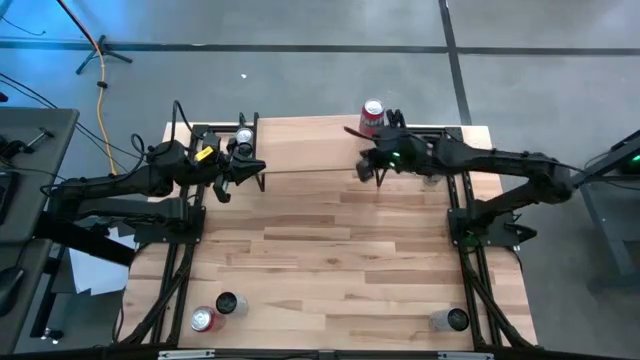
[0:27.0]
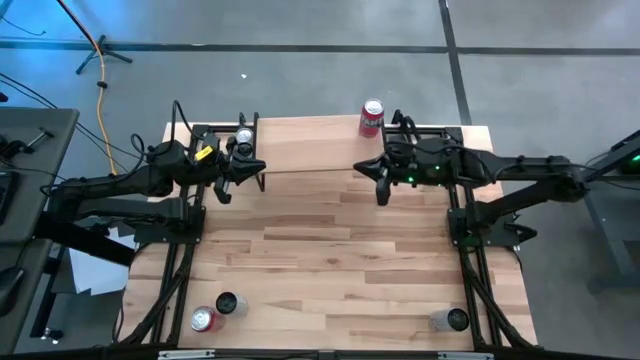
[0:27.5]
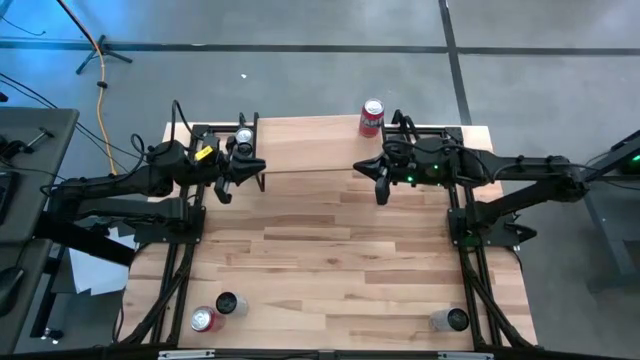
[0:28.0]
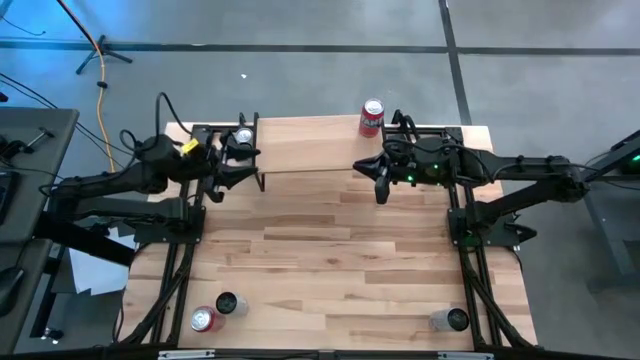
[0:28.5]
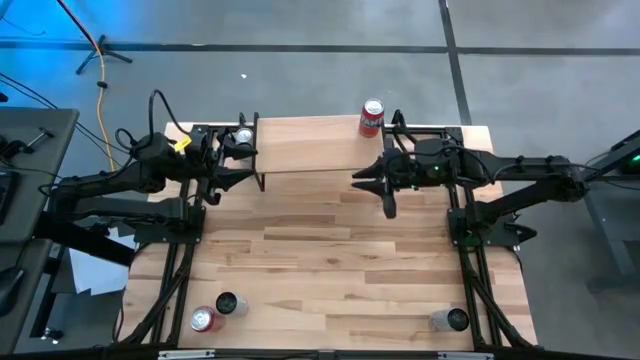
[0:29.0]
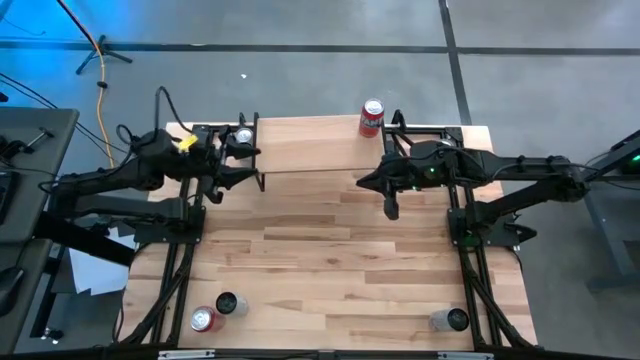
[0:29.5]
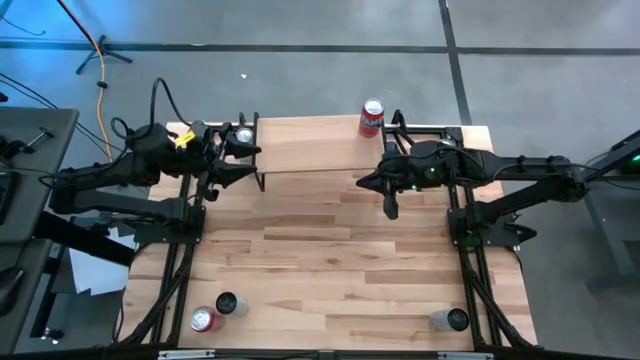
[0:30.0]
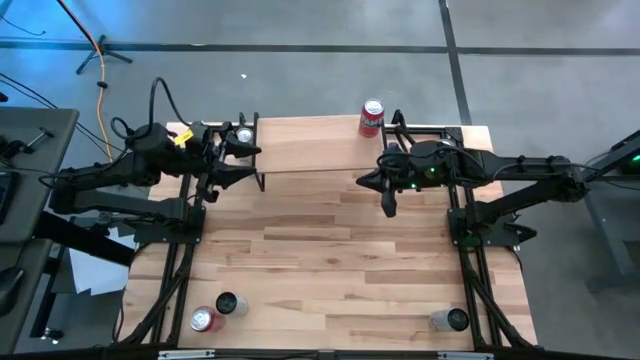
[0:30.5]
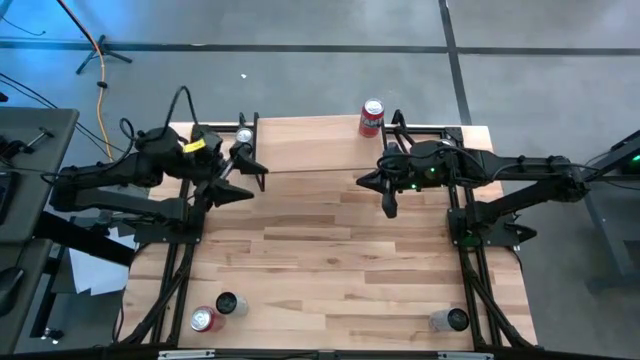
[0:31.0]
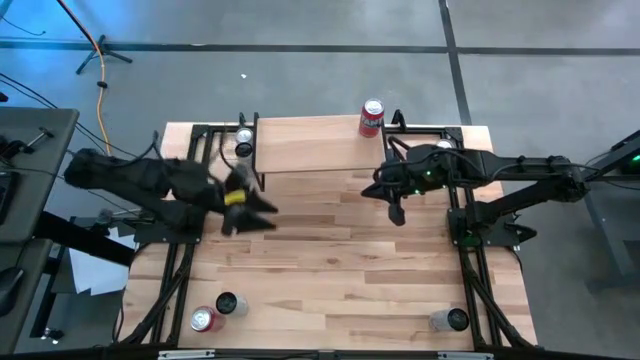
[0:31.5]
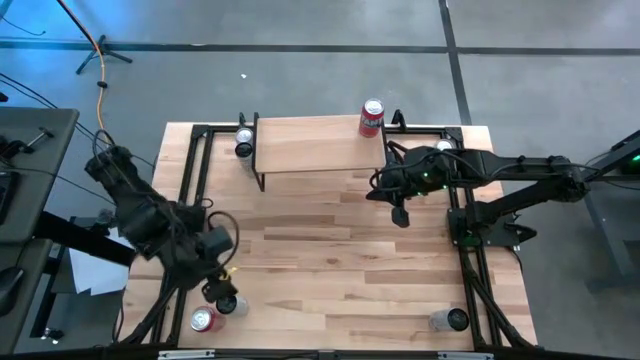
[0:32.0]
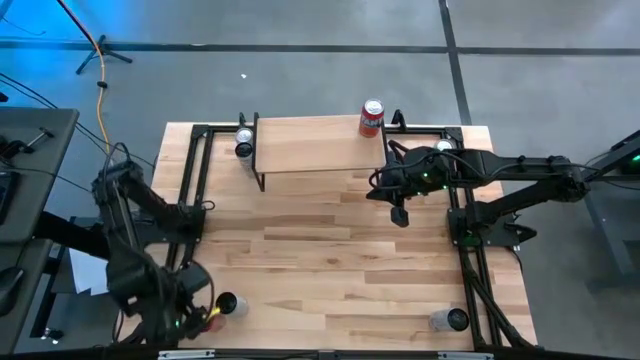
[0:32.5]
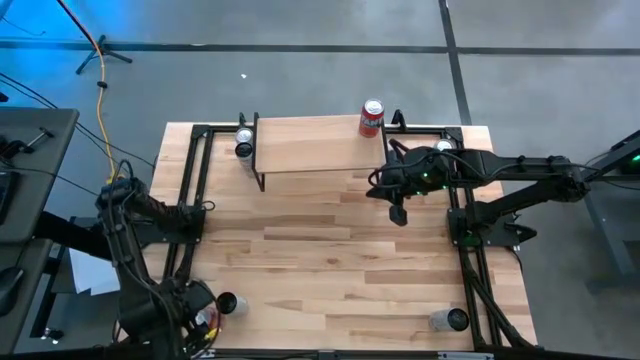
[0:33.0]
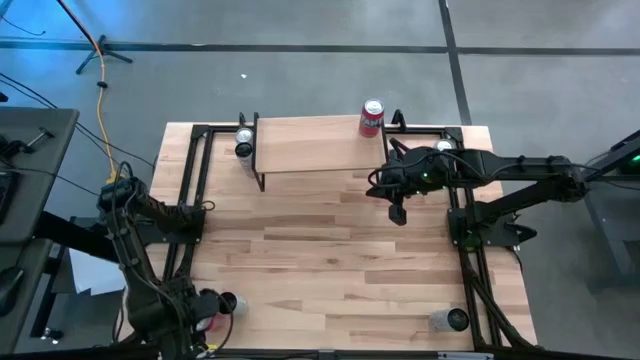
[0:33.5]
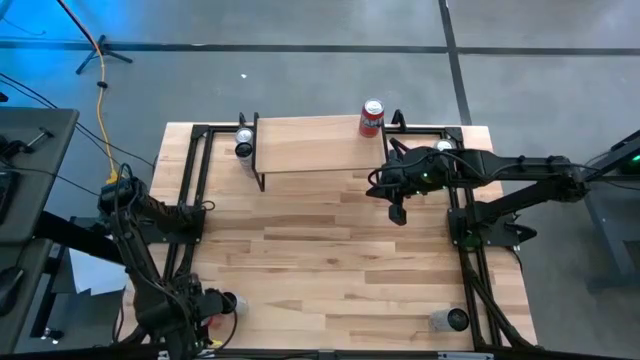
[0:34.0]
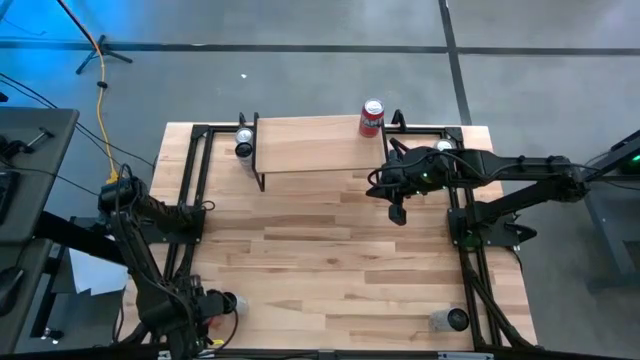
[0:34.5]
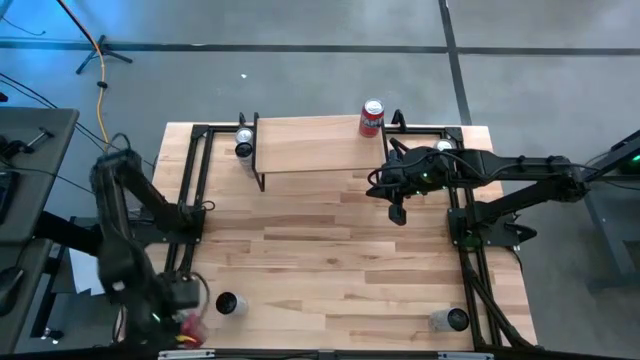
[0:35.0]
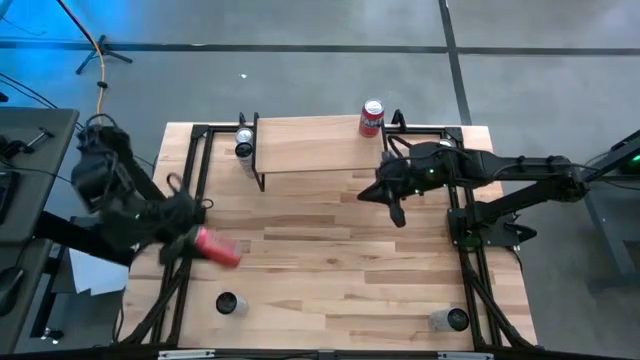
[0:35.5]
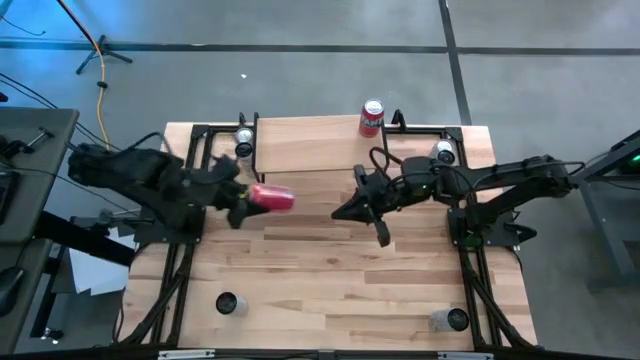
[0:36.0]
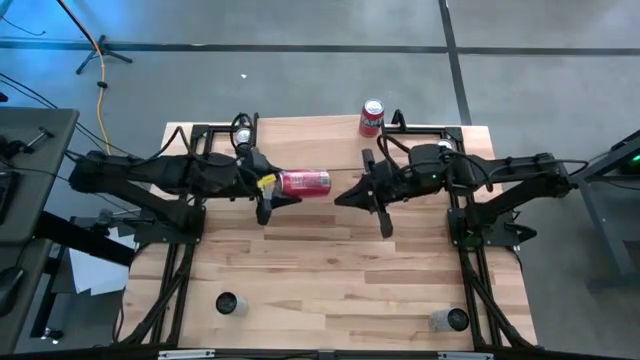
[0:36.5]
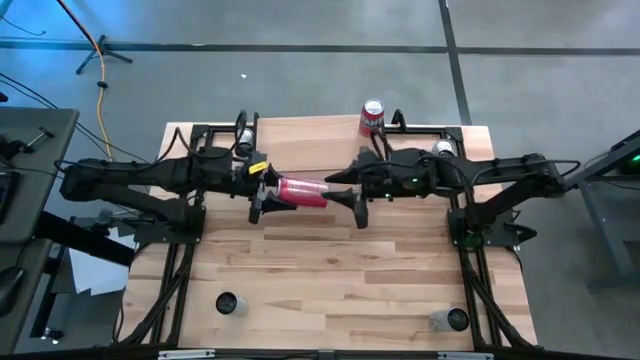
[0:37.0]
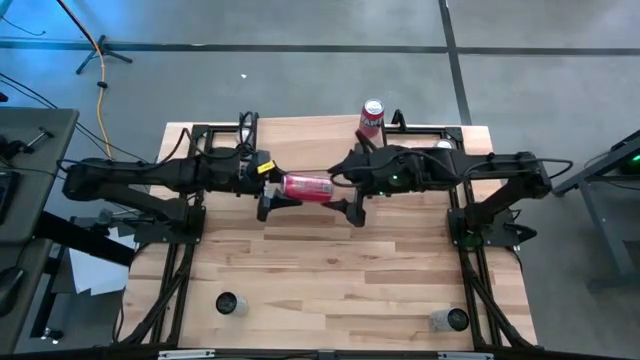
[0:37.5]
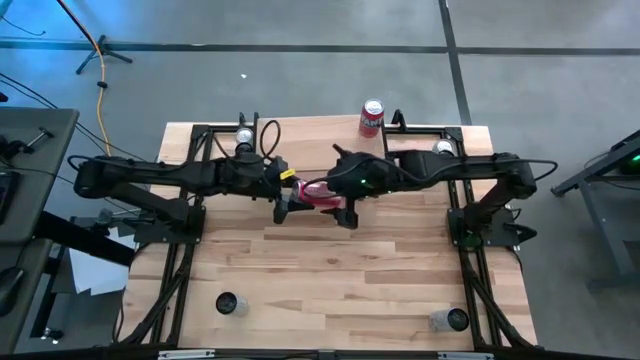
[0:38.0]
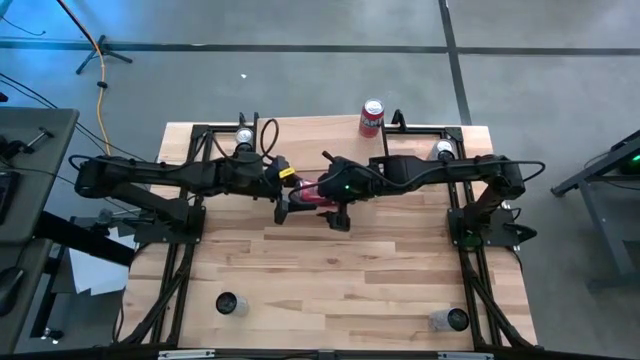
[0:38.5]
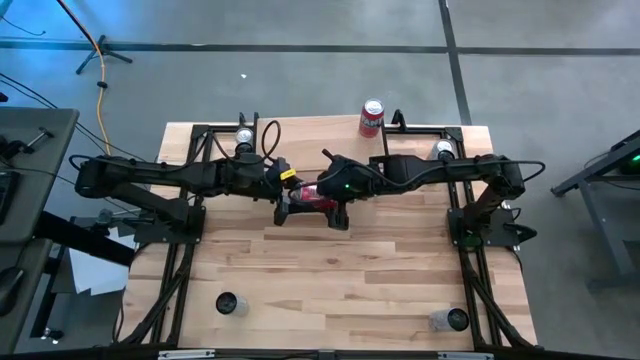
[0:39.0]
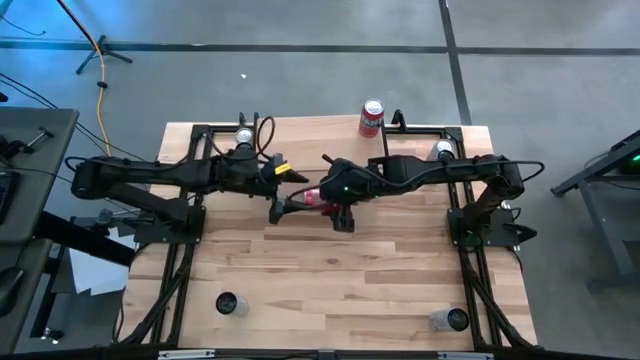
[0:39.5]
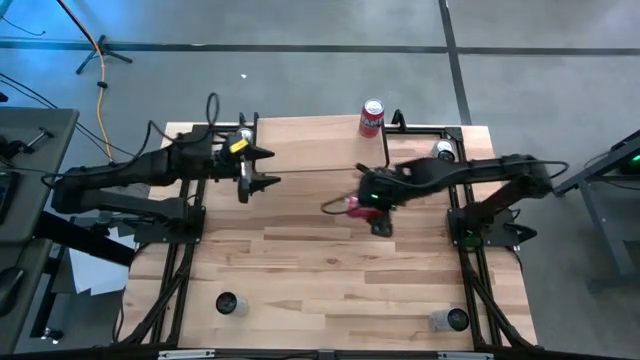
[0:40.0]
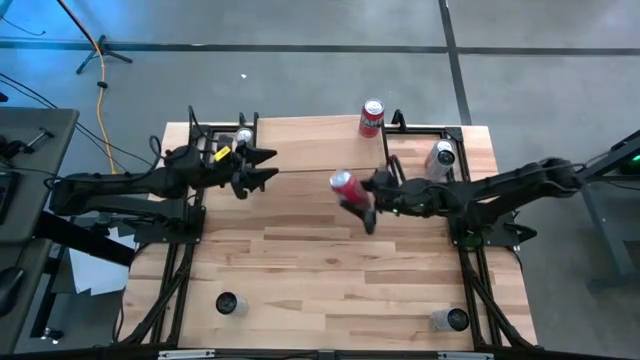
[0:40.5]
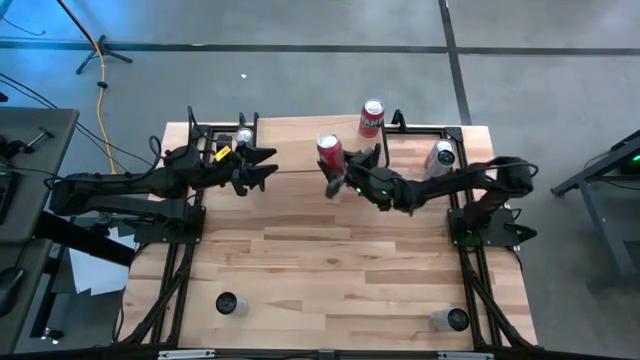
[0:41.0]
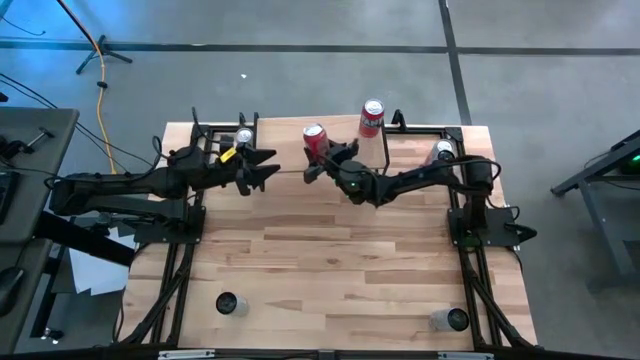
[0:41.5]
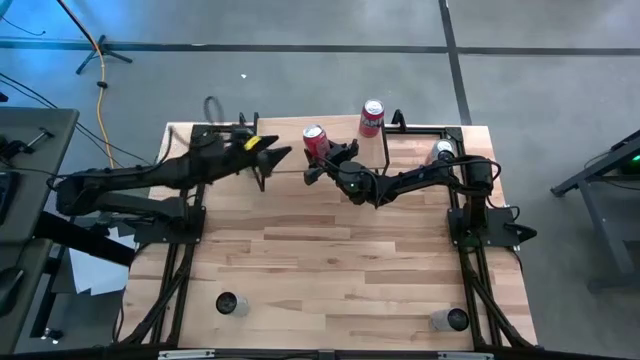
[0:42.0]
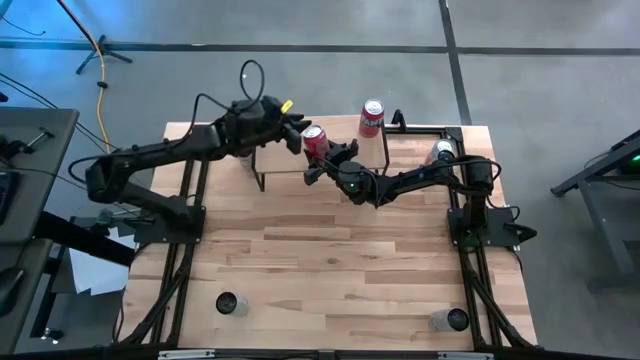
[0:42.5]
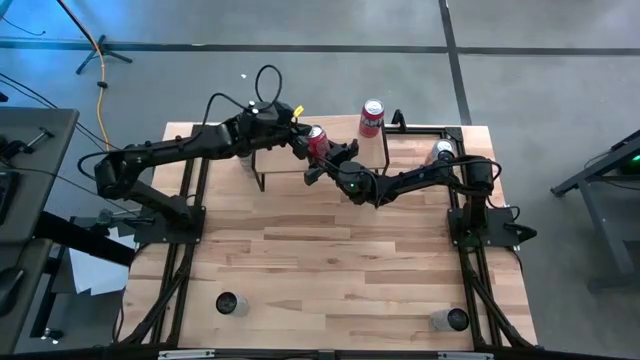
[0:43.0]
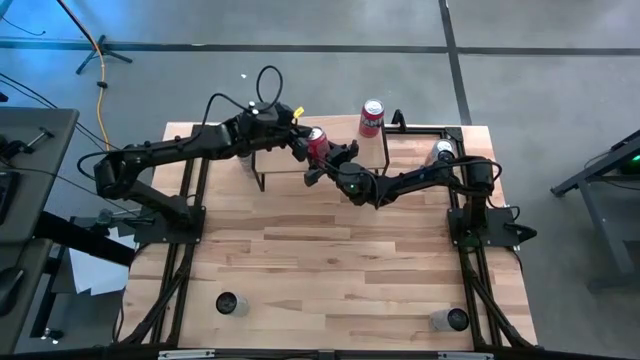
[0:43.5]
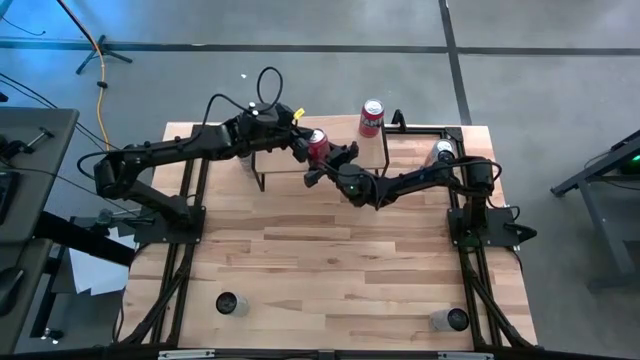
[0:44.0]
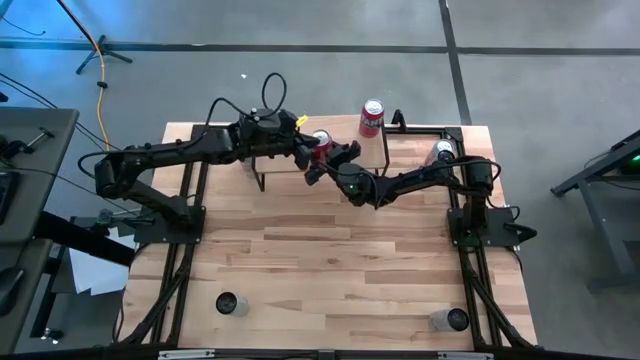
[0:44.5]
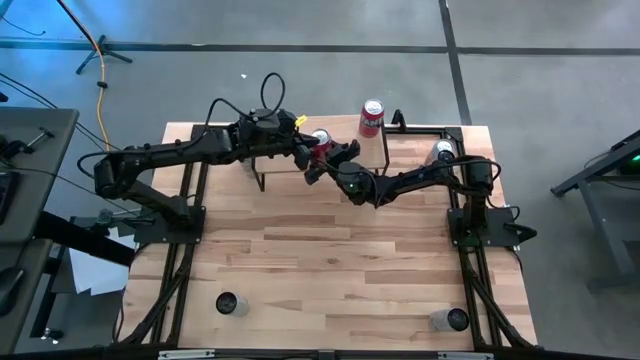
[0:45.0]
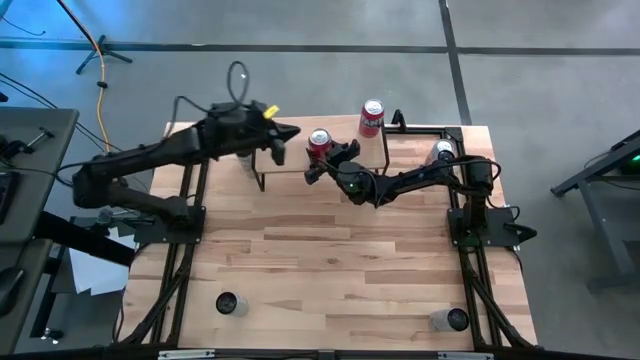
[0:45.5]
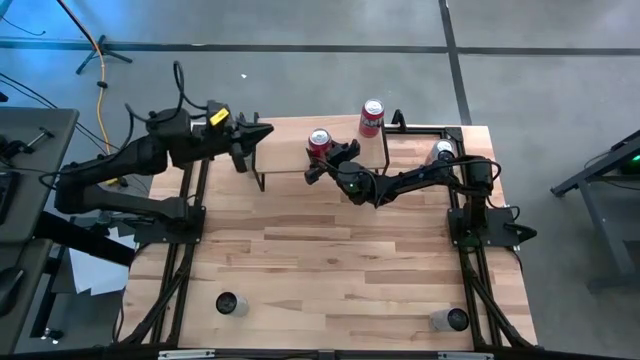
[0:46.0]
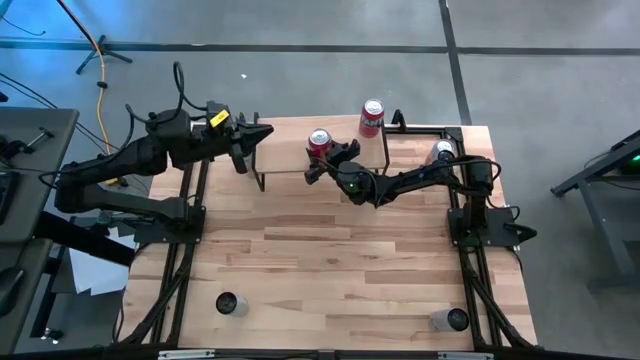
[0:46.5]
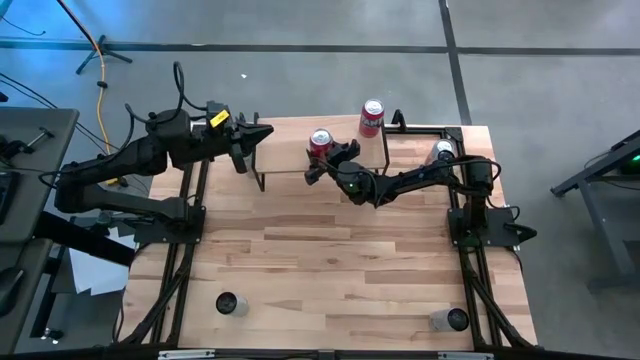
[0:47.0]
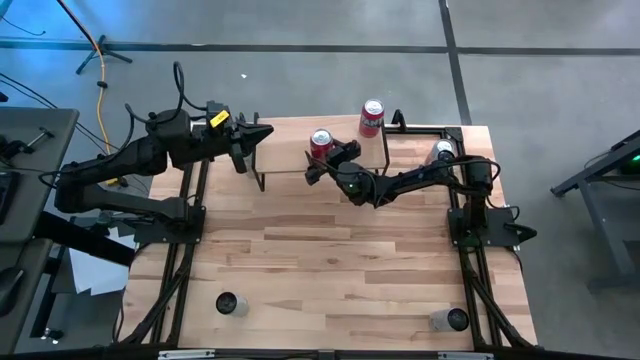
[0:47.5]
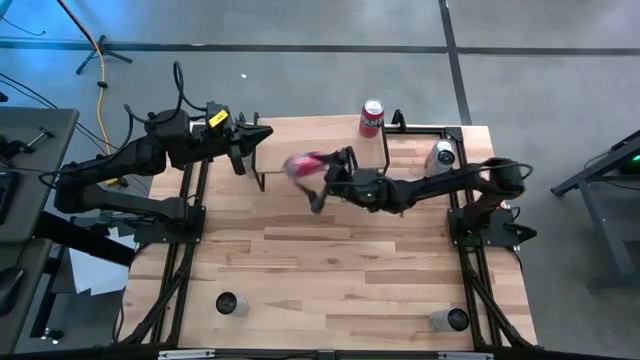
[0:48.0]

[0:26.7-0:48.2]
Task: Place canned beverage on shelf
Put the orange soda can on the shelf
